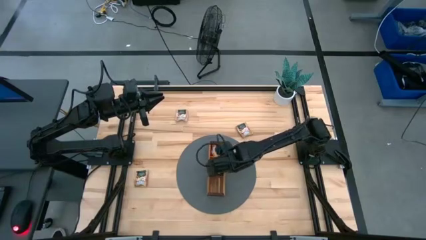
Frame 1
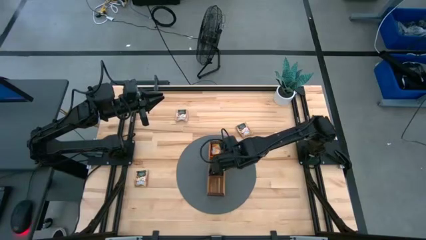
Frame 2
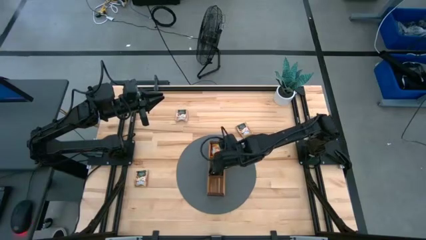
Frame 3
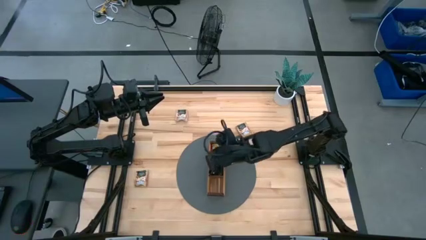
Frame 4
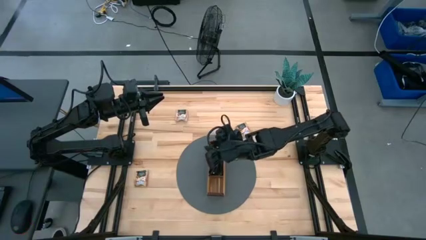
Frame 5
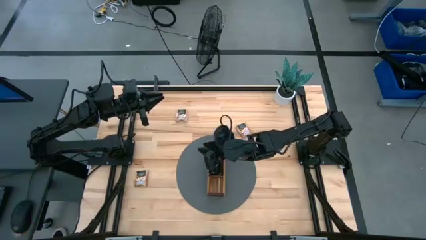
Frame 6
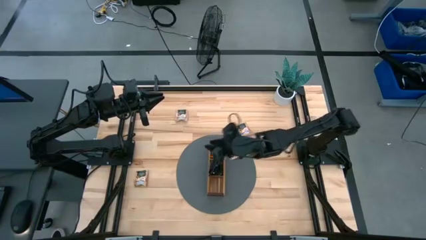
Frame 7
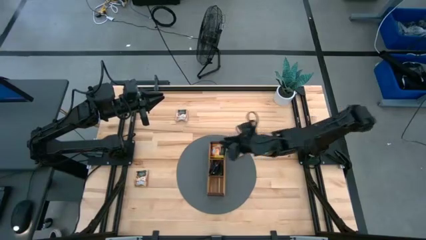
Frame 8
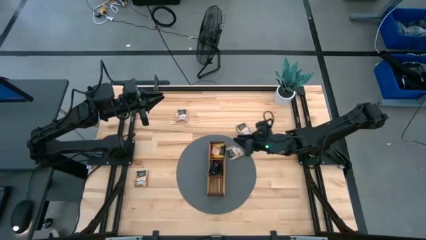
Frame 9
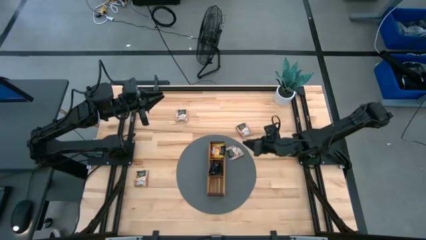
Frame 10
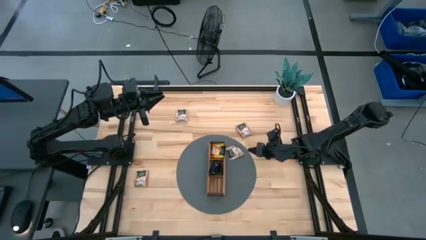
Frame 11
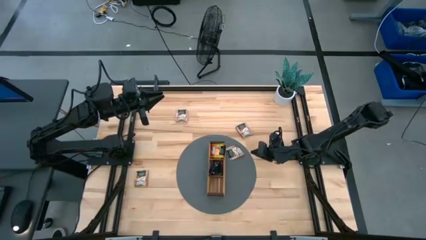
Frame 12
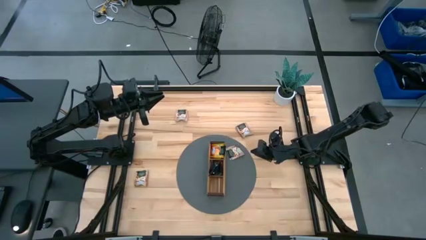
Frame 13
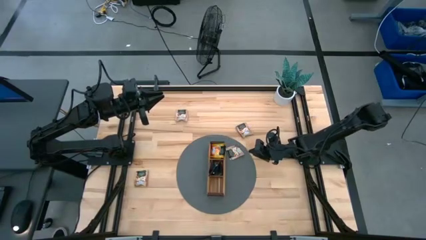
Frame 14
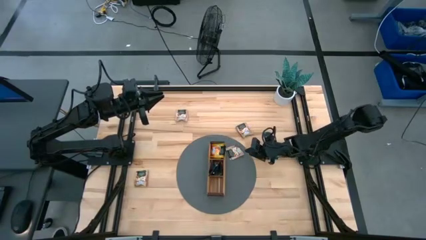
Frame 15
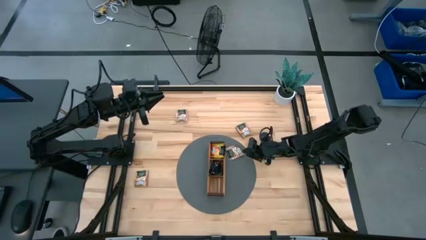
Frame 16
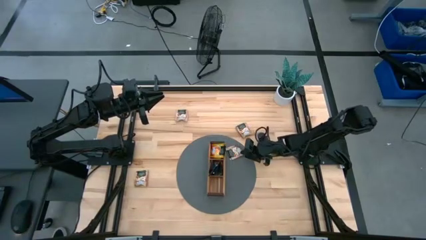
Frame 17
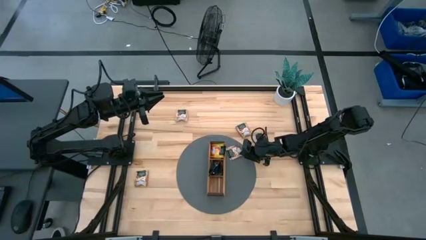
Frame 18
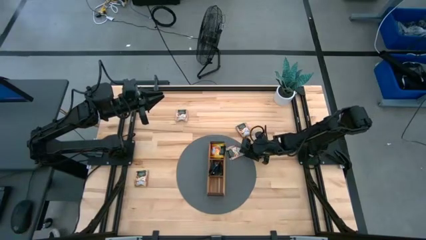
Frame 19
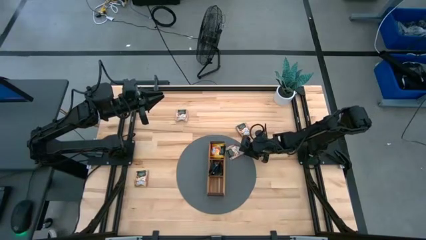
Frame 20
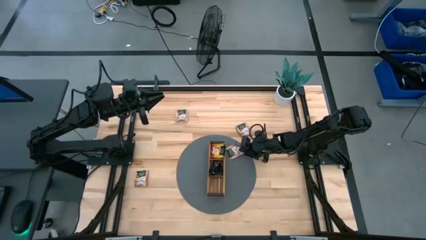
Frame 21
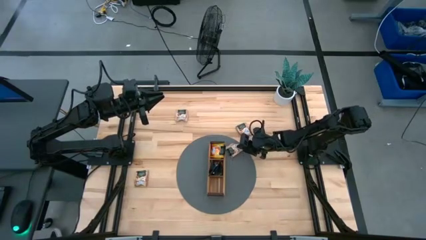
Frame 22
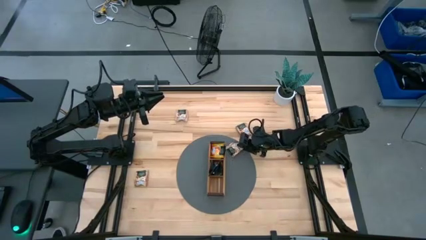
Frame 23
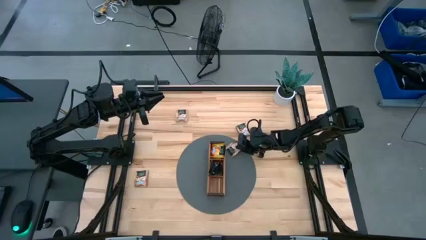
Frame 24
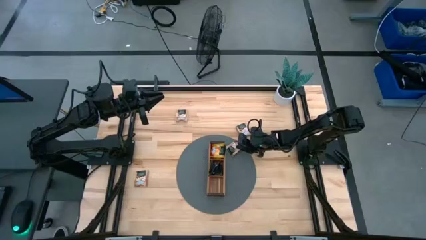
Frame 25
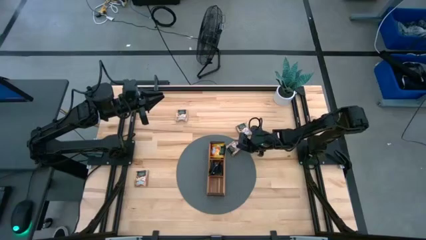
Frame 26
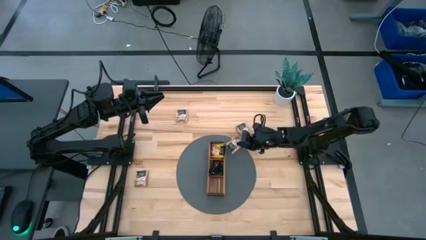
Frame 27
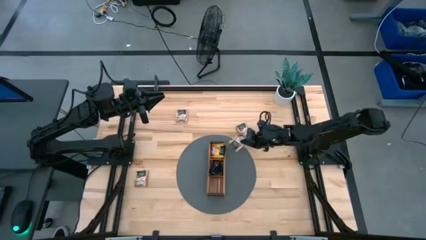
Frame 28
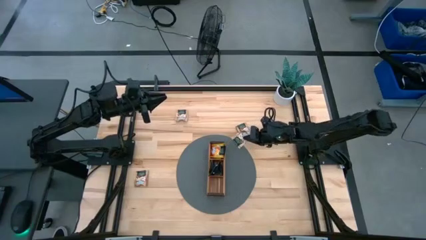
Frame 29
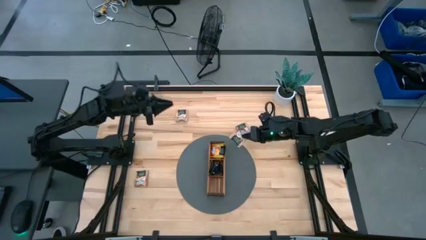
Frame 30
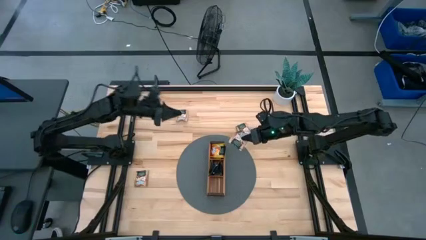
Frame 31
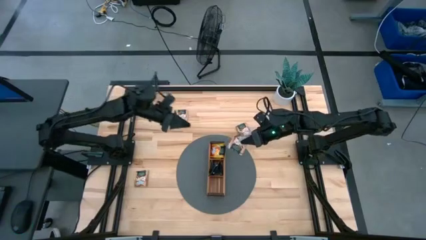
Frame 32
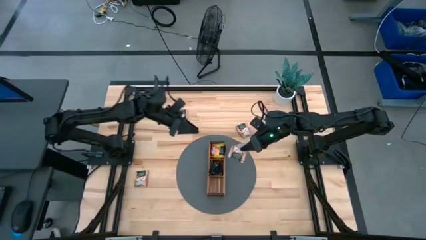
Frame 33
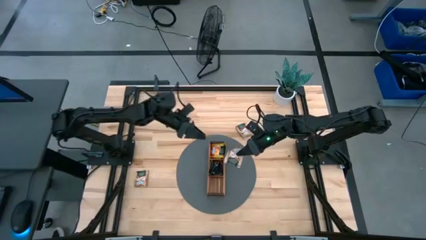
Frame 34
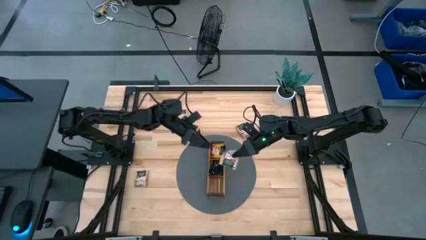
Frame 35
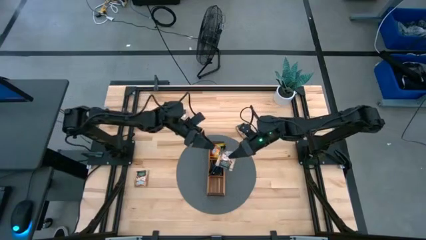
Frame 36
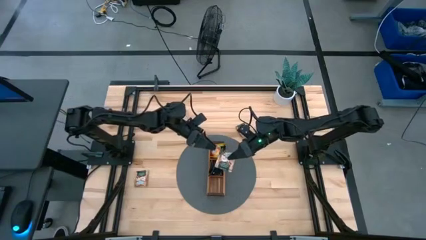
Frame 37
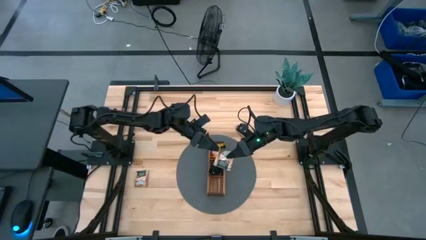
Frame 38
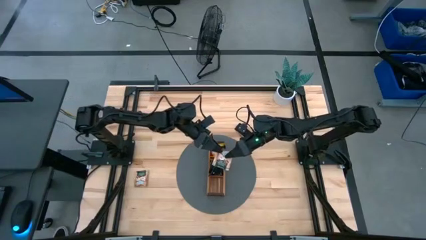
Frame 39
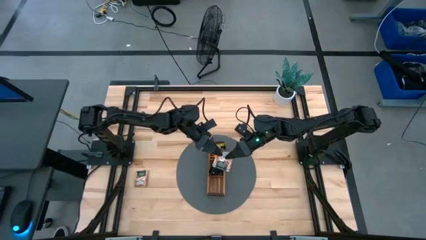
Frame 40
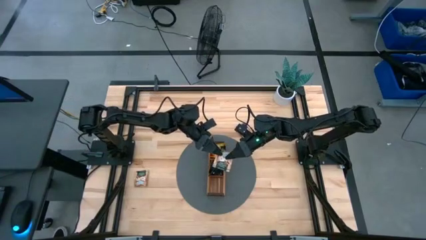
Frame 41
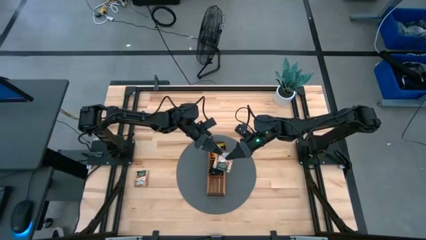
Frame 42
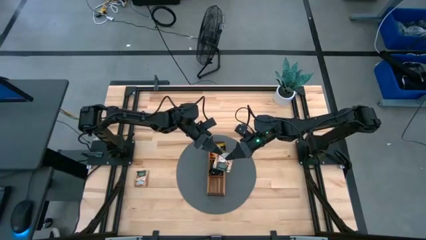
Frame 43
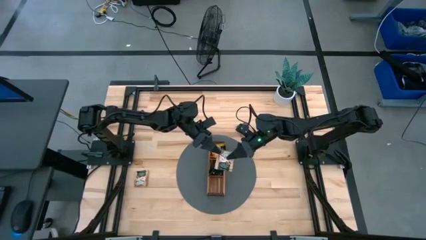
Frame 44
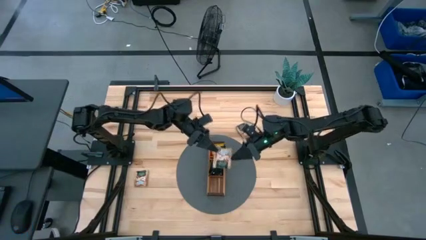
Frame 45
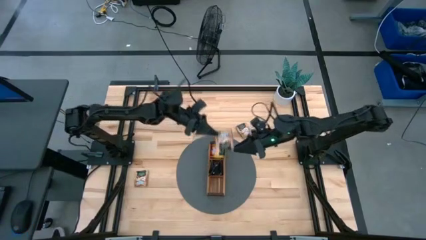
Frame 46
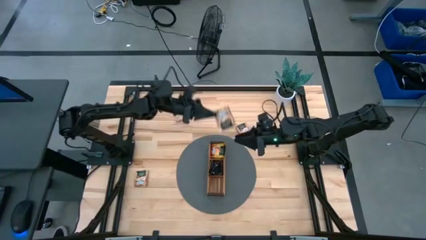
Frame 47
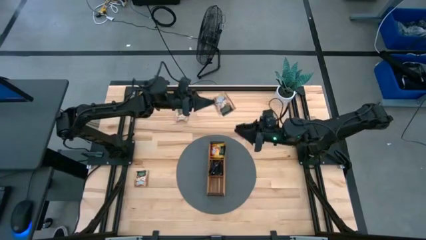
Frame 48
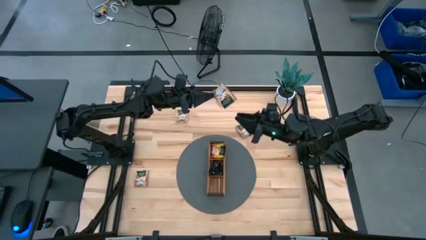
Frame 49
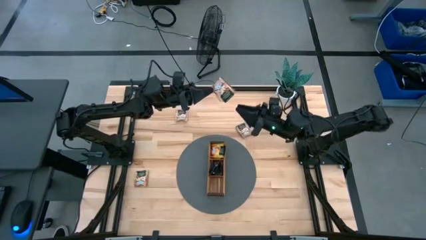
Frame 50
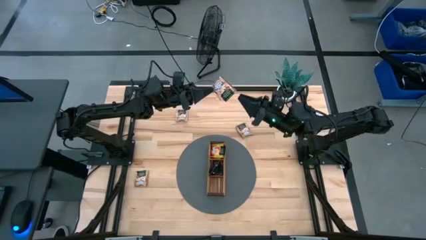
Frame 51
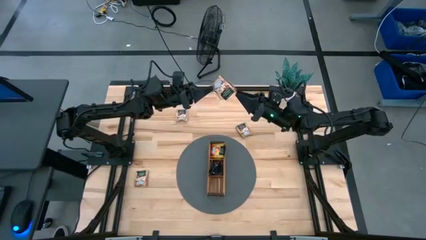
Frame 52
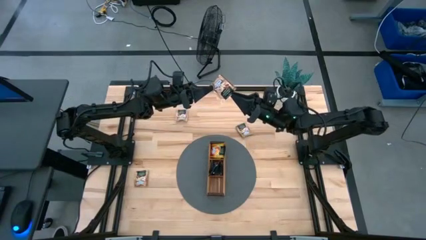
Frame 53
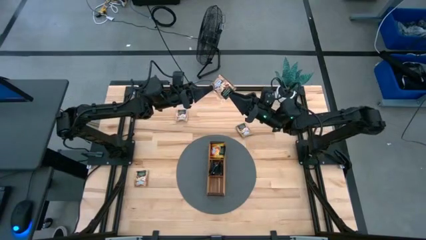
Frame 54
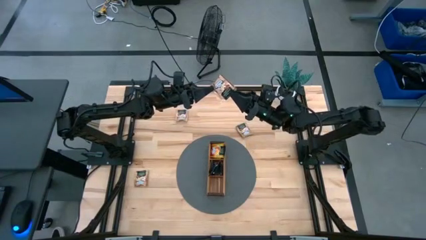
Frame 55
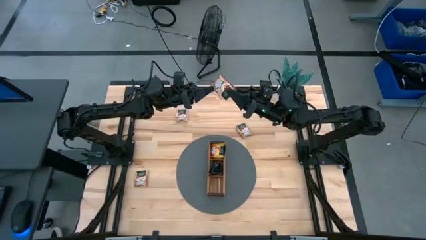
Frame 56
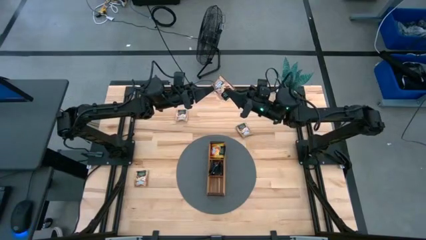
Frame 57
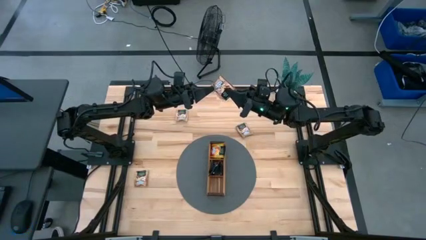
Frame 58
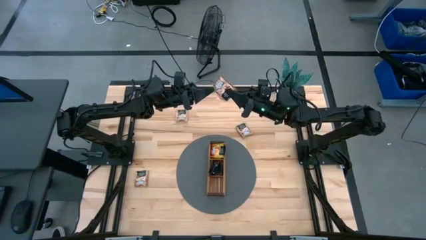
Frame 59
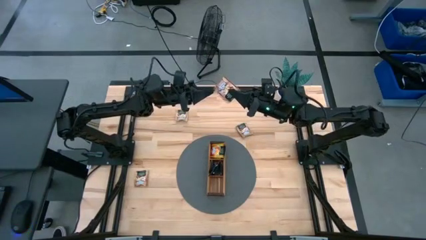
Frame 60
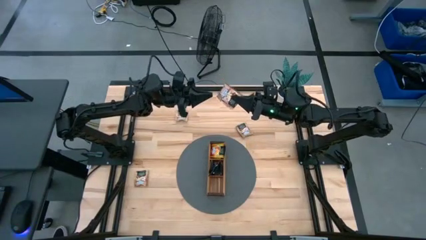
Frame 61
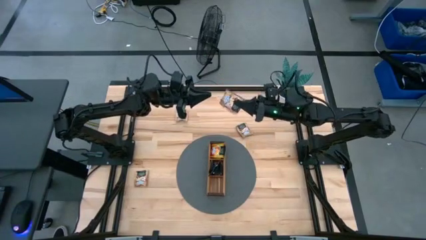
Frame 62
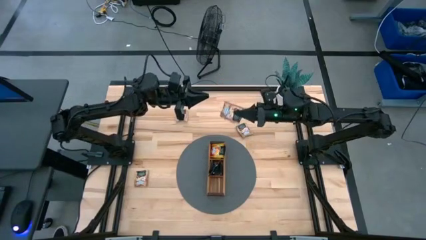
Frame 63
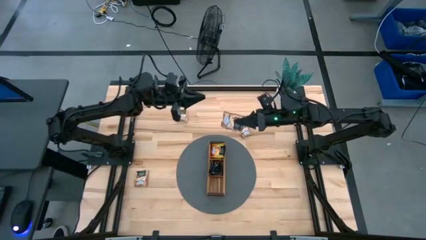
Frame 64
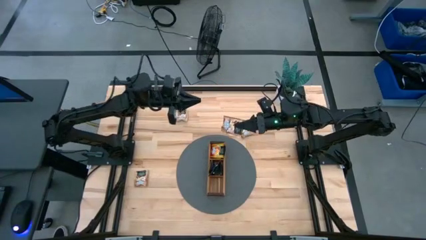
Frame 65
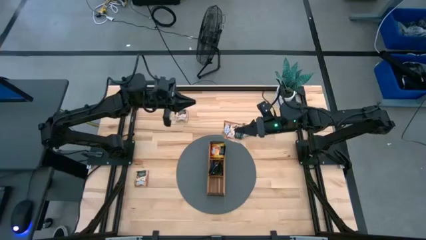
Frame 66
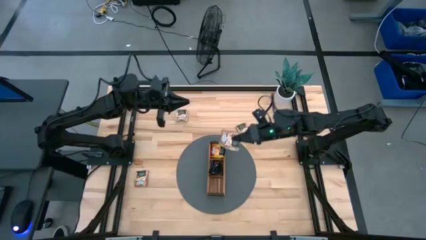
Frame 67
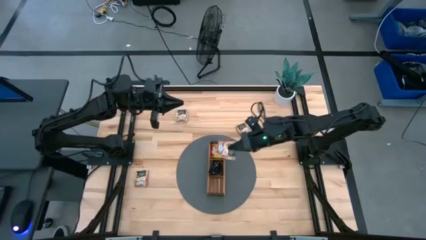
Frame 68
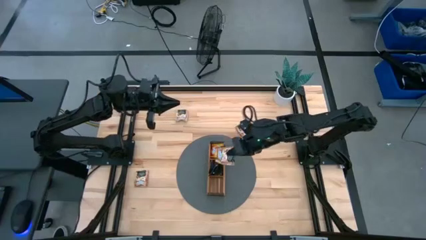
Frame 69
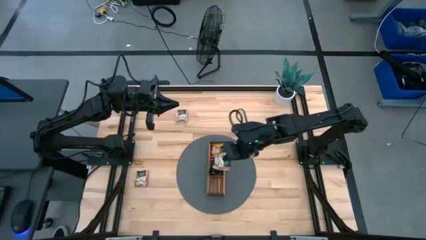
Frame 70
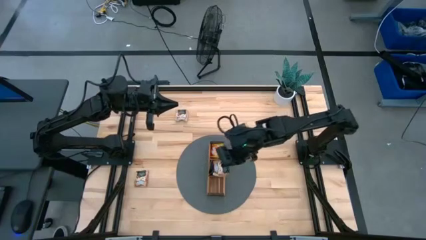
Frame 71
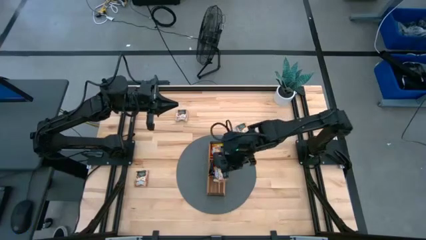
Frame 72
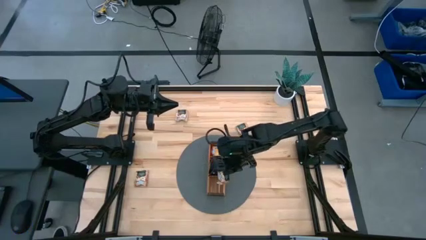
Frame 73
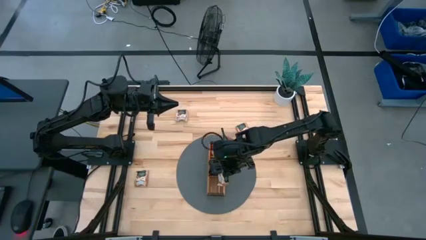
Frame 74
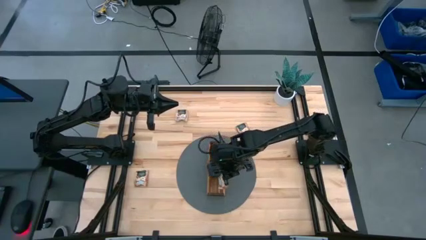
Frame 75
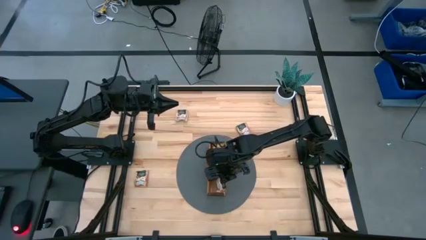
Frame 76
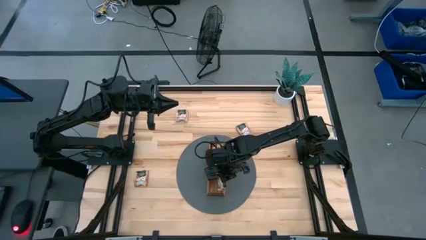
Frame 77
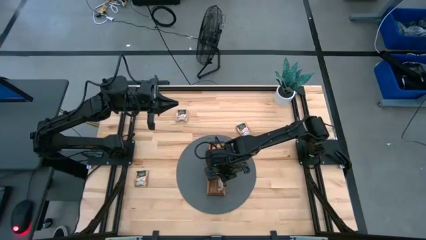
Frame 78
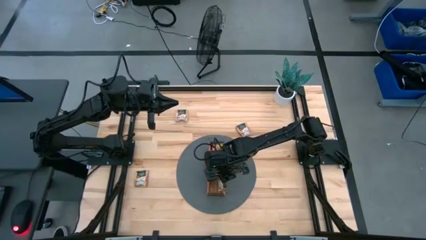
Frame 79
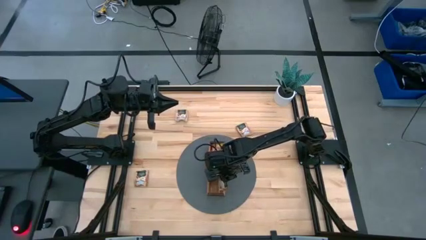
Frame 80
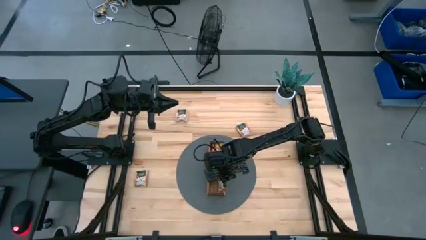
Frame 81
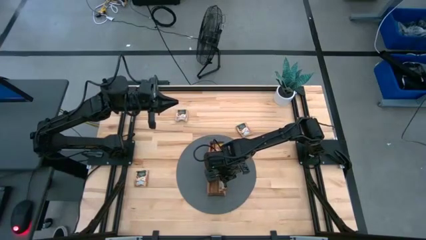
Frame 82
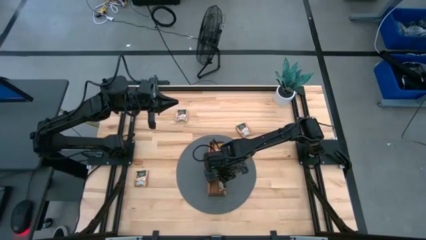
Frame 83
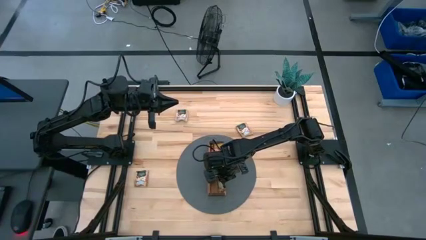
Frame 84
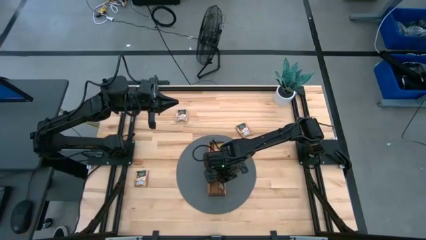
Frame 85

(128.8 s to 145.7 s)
Task: Pick & Place Tea
Put the brown tea bag into the bottom section of the wooden organizer
